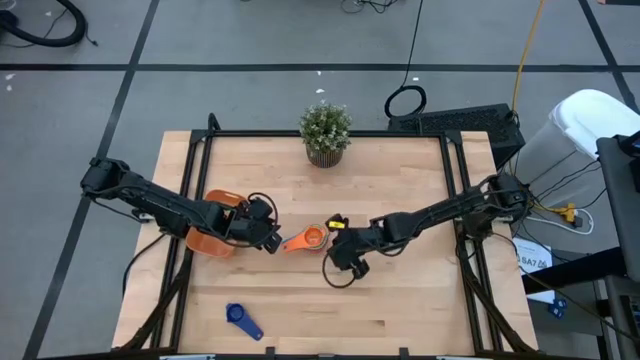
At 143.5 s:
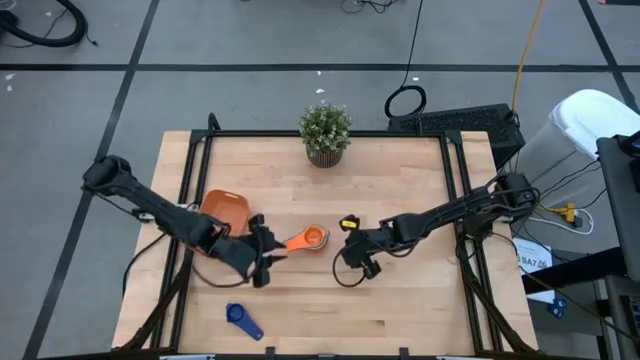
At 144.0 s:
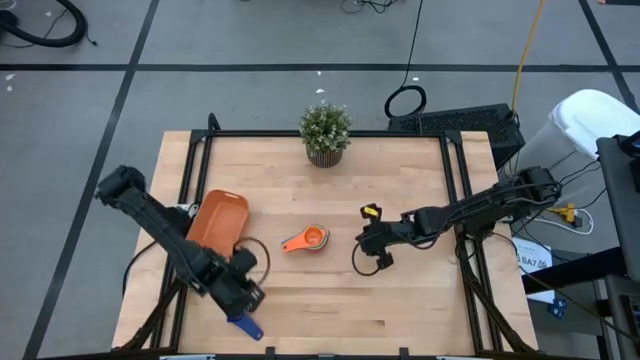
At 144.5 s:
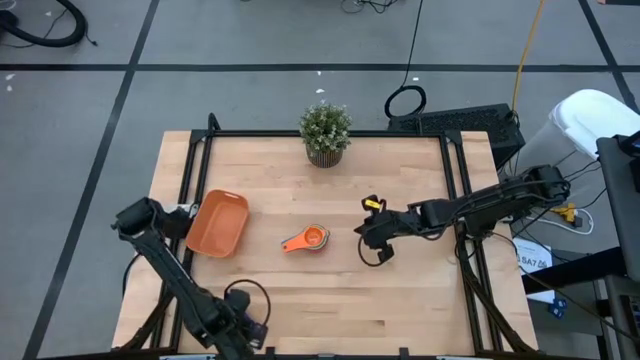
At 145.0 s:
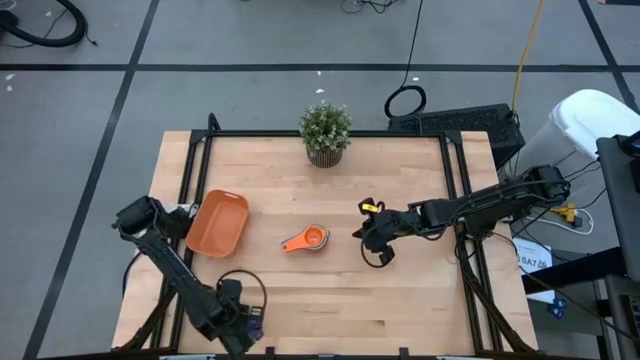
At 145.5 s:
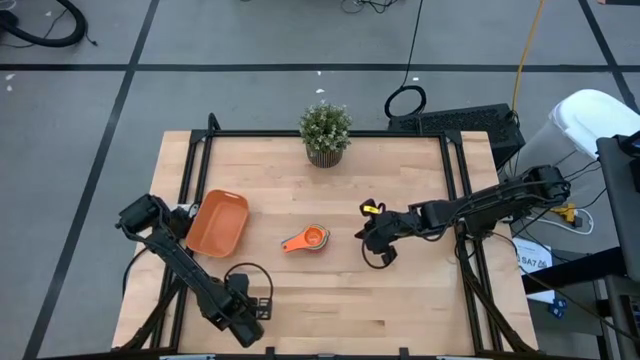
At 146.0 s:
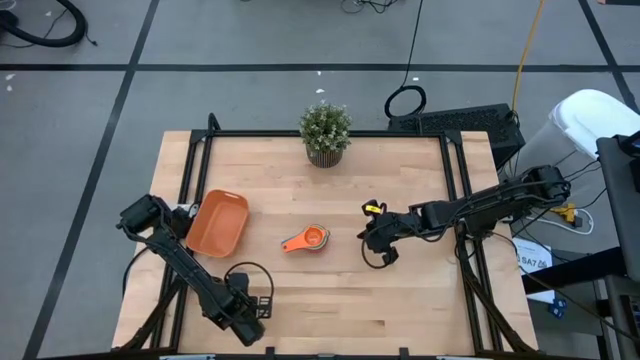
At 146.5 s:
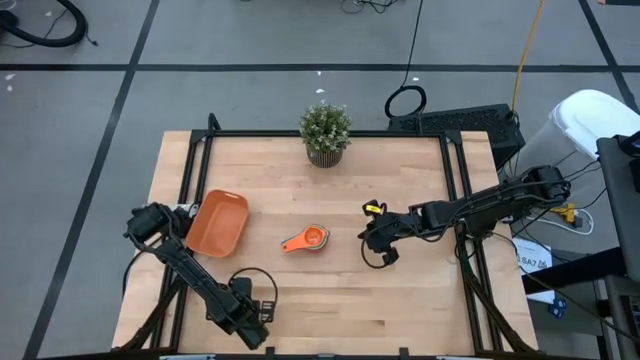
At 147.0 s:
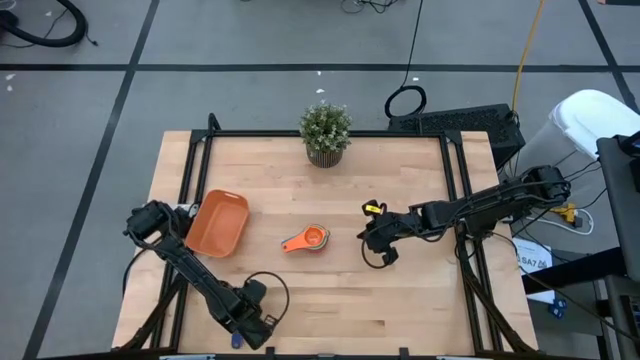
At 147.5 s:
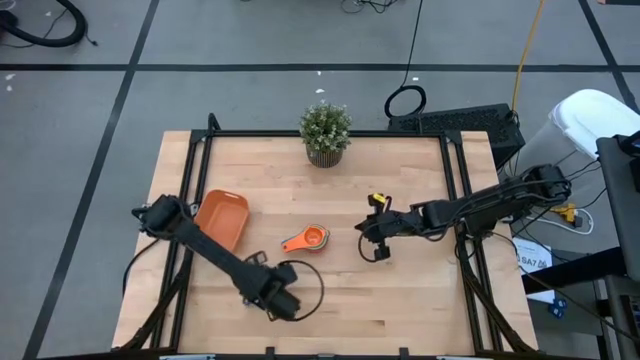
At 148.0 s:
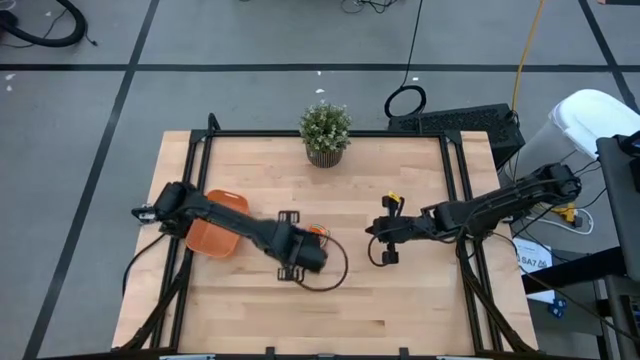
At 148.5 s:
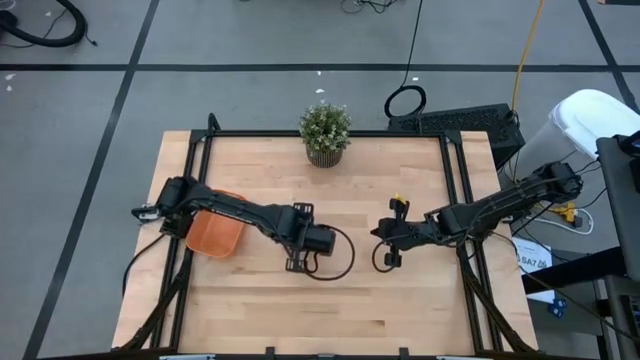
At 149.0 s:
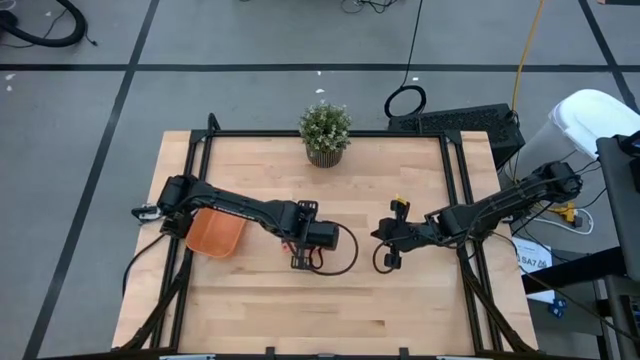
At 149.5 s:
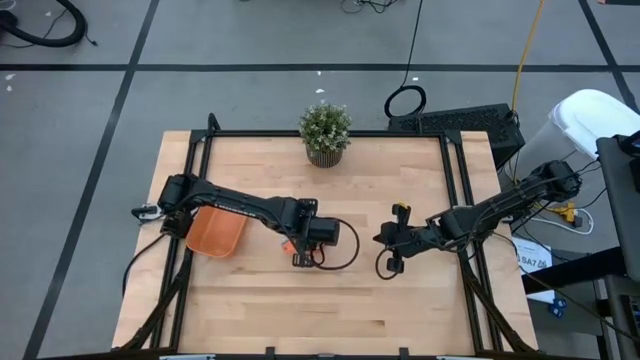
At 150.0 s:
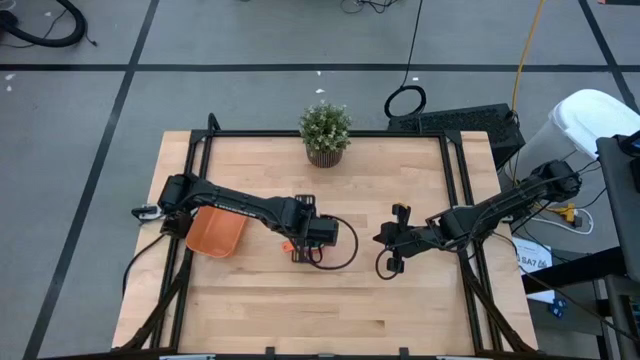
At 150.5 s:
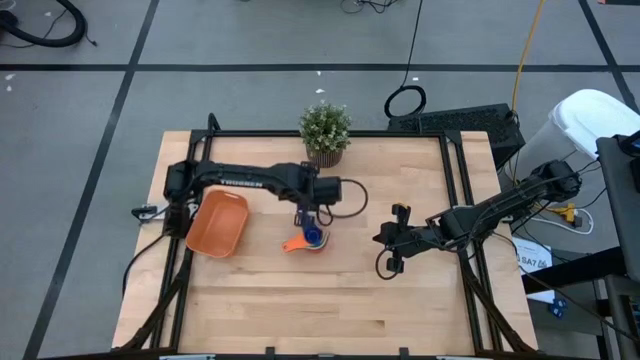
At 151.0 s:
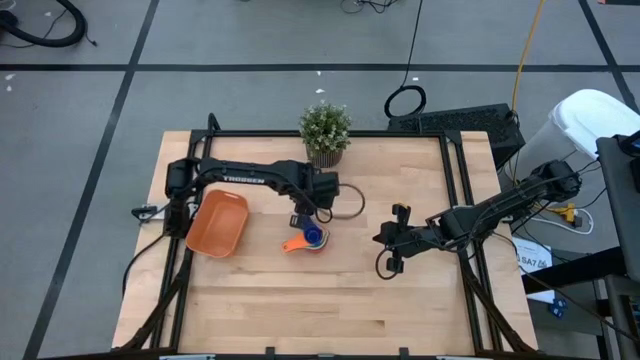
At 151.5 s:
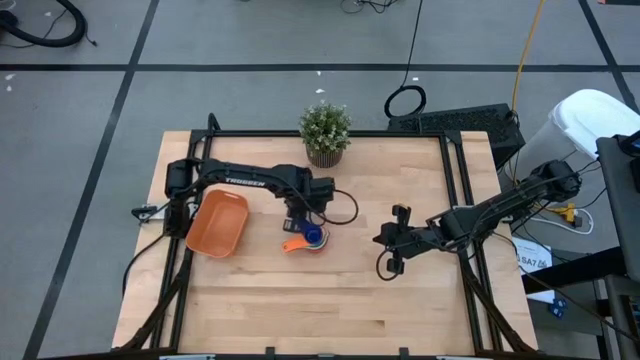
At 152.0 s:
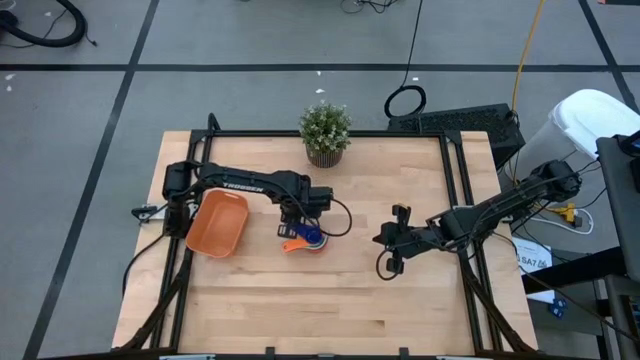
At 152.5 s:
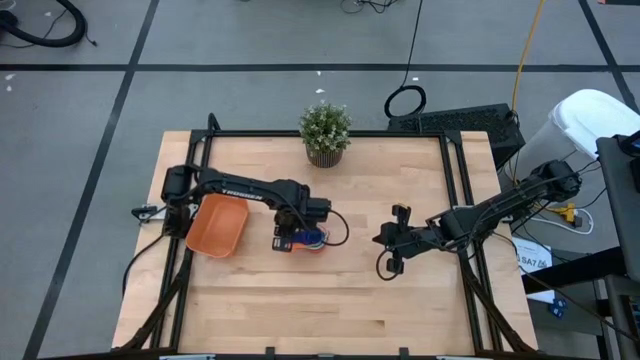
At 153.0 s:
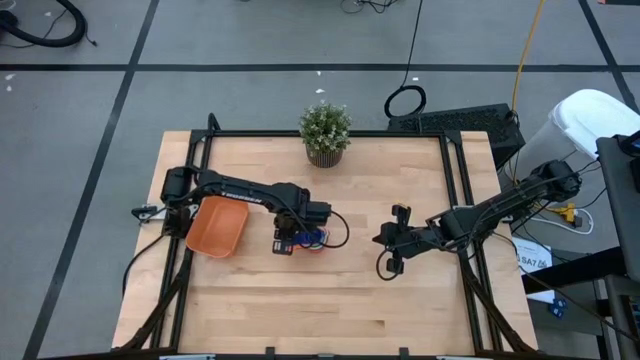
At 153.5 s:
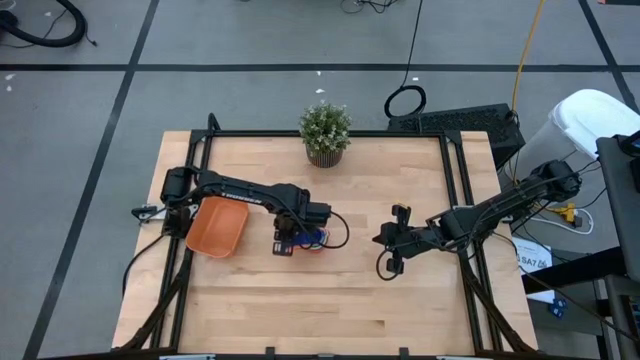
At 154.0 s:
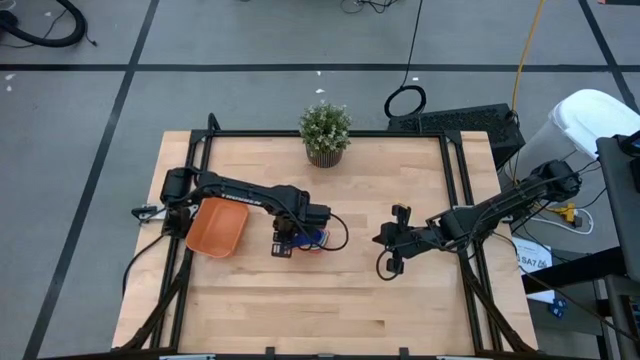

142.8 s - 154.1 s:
Task: Nest measuring cups in basket
Stack the dark blue measuring cup on top of the orange measuring cup

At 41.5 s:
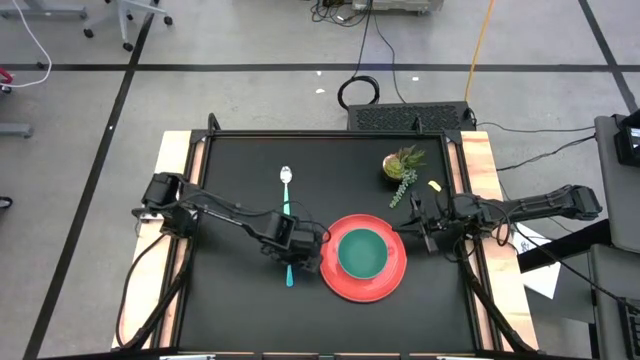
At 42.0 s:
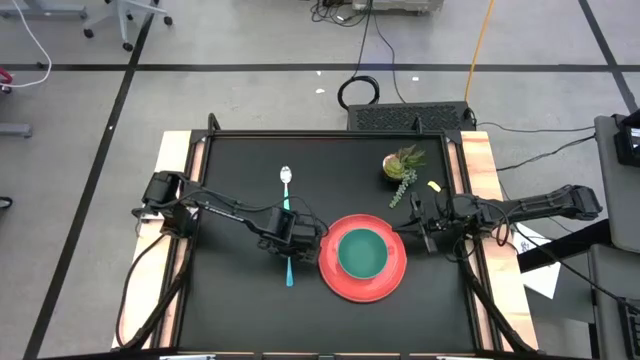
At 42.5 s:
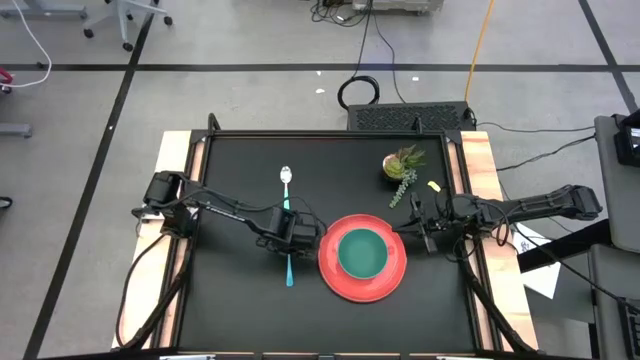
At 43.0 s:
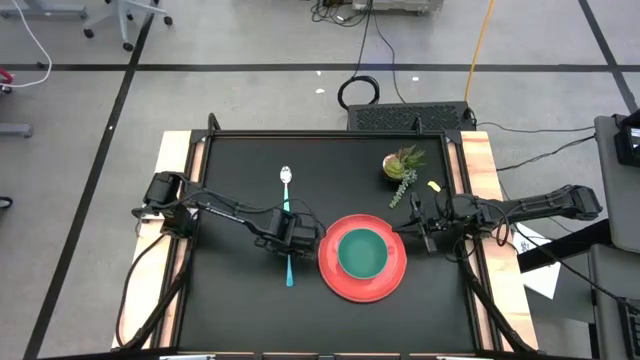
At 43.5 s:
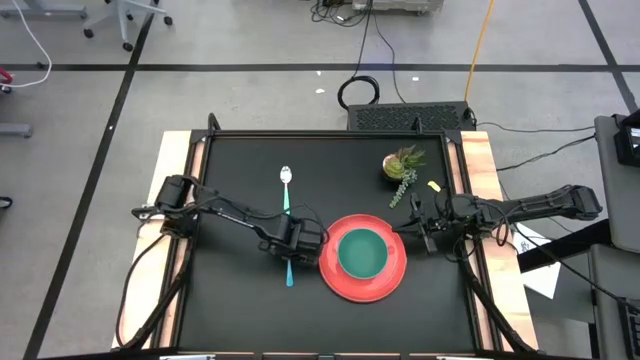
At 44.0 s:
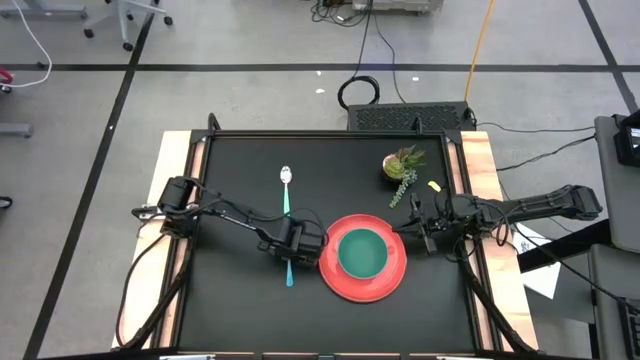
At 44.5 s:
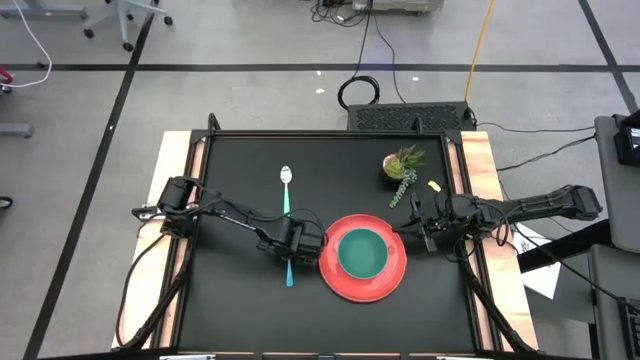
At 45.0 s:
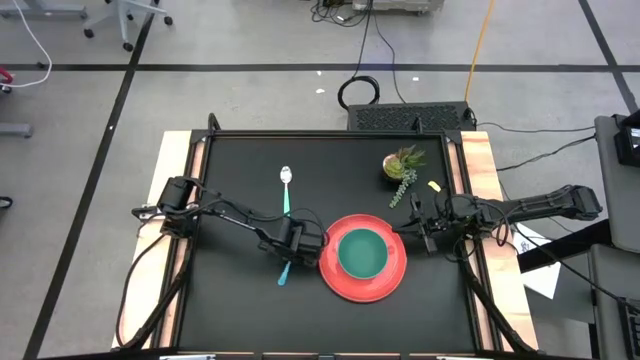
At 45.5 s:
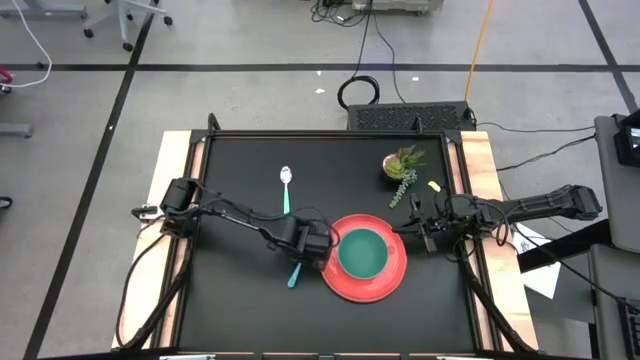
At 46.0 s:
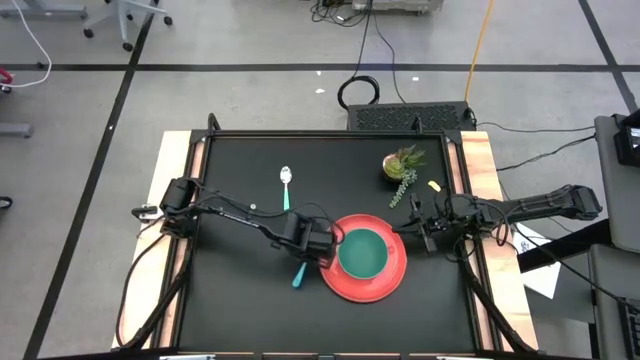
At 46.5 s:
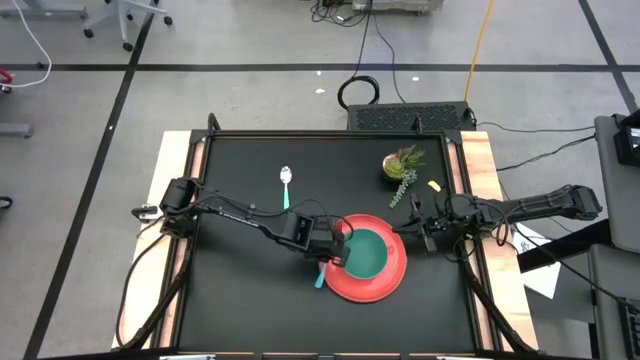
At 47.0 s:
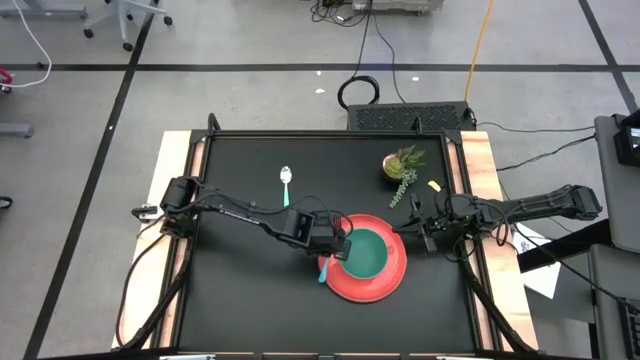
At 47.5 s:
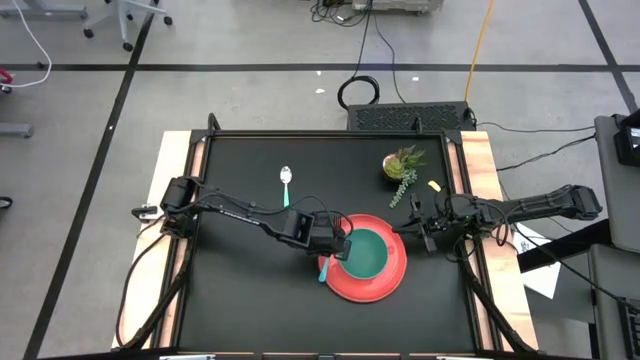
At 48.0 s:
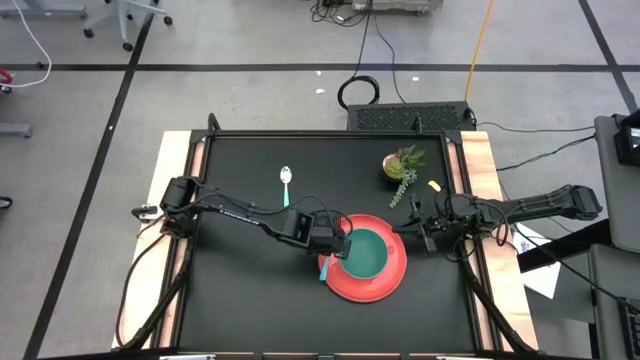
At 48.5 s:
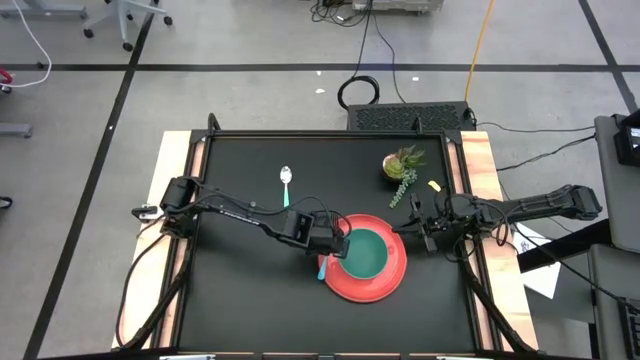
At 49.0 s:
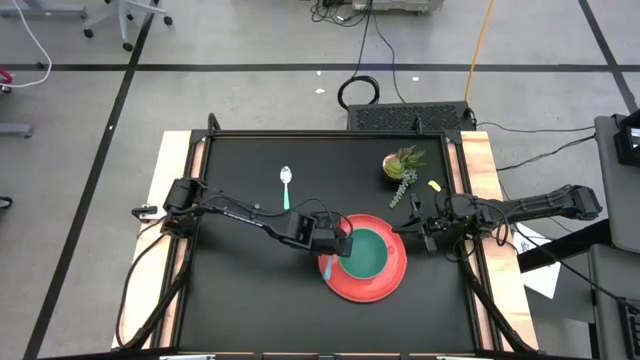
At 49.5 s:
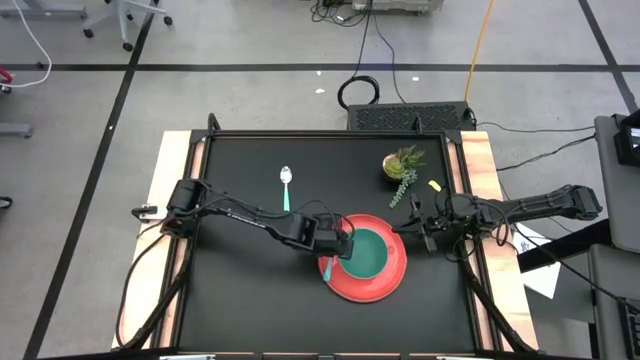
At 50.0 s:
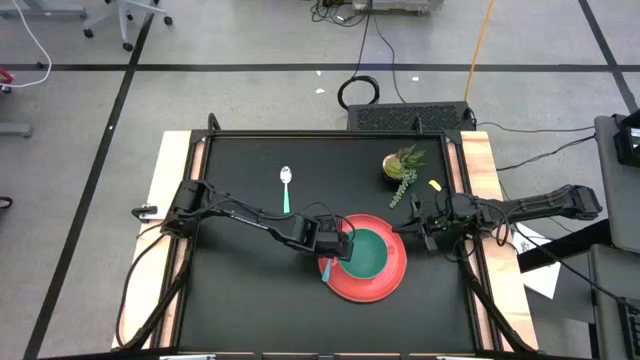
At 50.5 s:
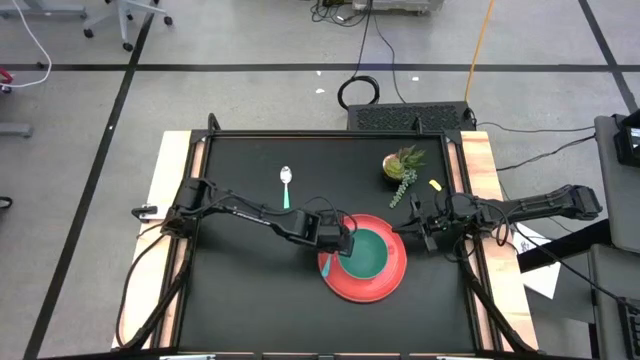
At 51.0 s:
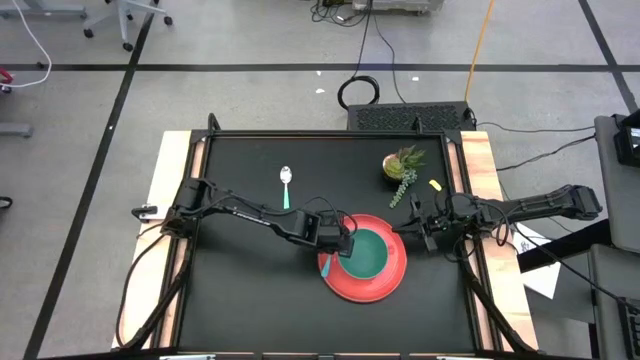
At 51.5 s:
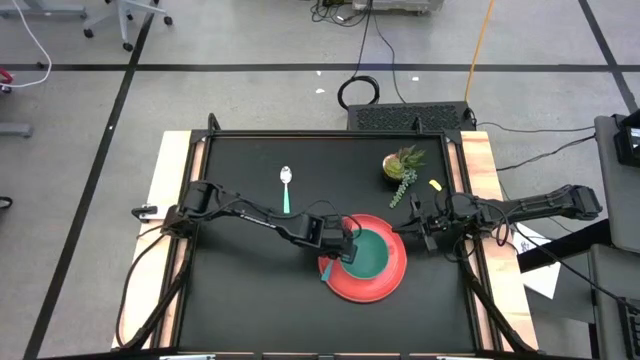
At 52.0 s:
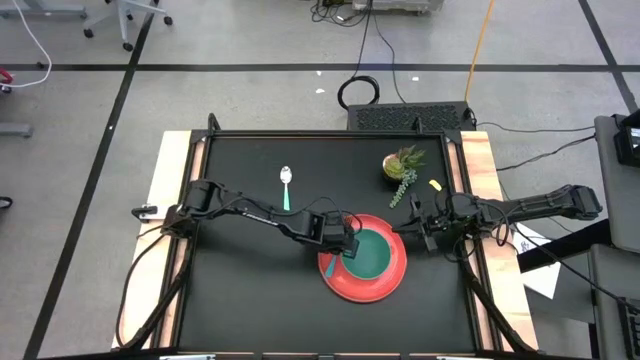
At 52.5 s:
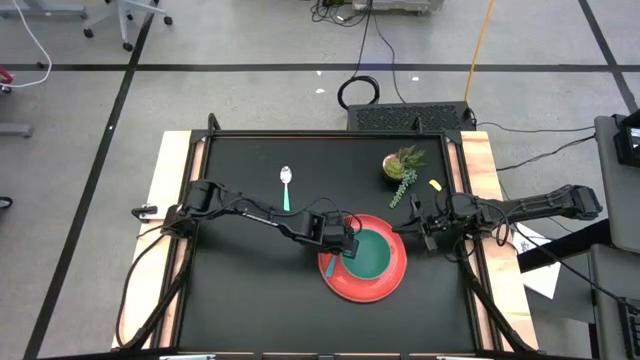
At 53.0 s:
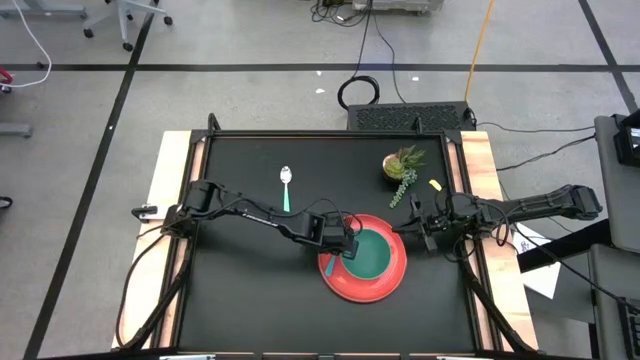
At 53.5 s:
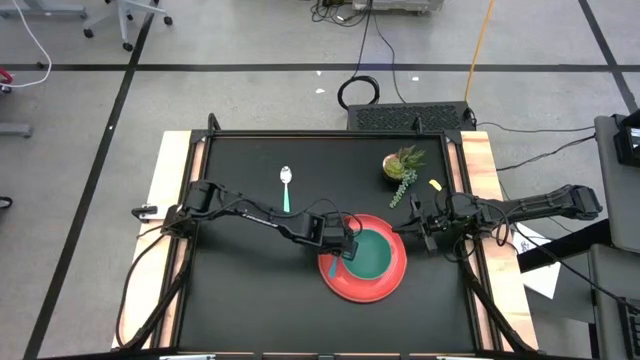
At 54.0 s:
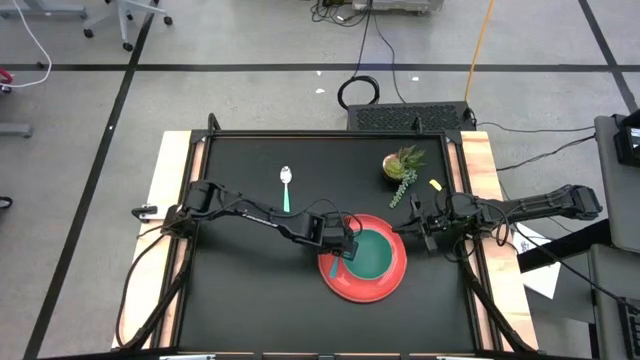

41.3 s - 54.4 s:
Task: Set table place
Put the blue fork to the left of the green bowl on the orange plate
